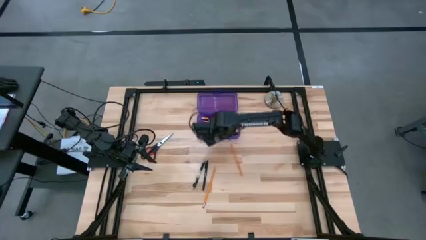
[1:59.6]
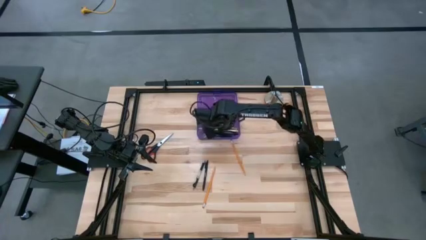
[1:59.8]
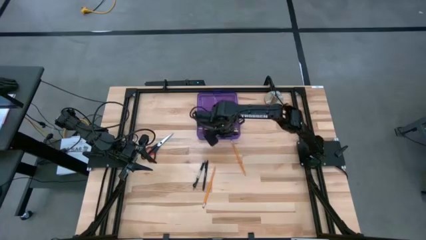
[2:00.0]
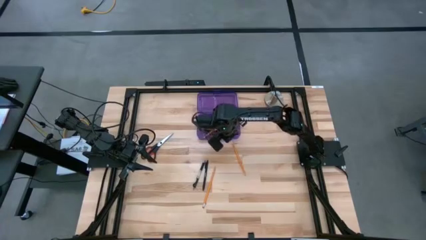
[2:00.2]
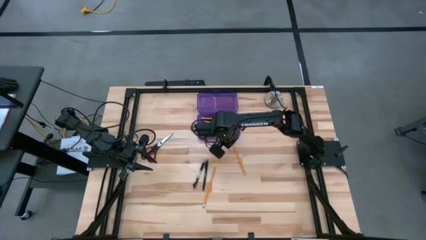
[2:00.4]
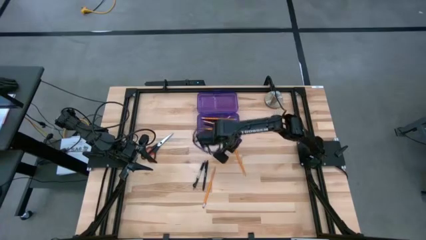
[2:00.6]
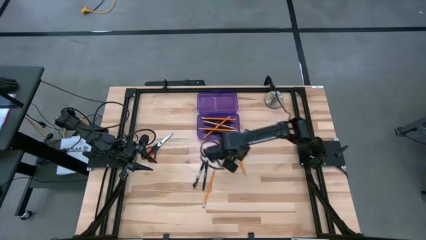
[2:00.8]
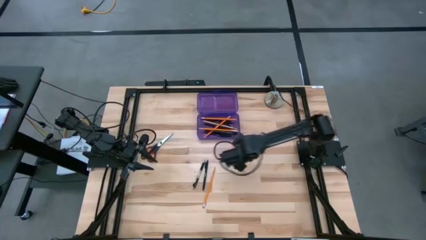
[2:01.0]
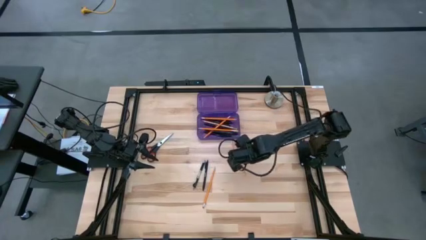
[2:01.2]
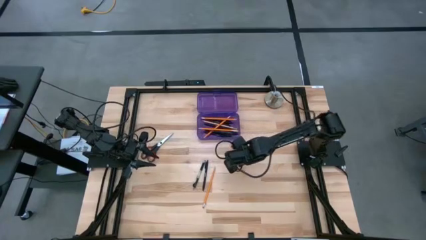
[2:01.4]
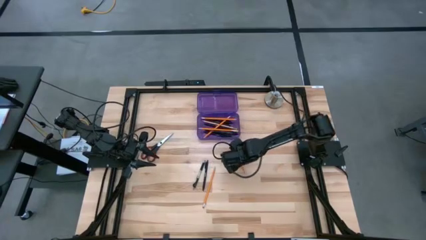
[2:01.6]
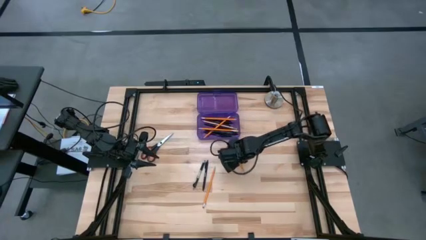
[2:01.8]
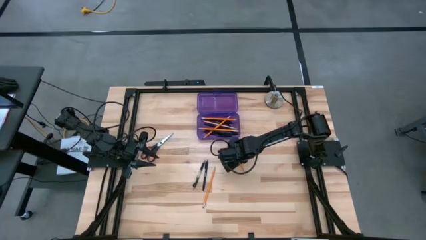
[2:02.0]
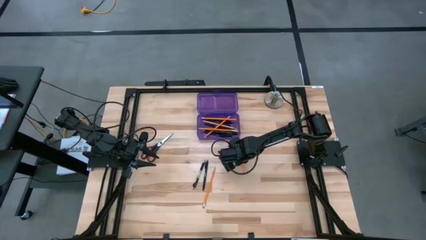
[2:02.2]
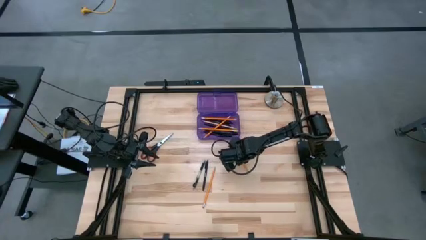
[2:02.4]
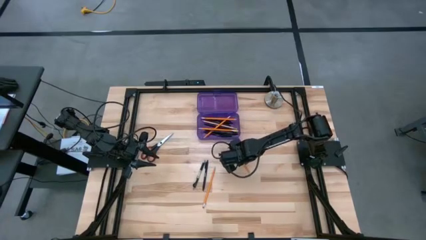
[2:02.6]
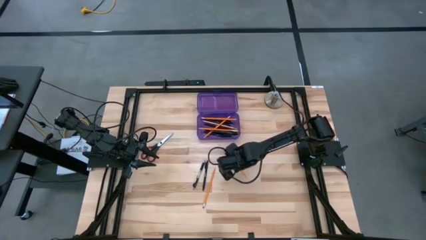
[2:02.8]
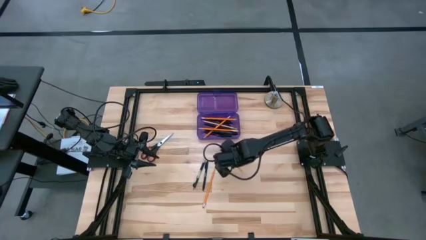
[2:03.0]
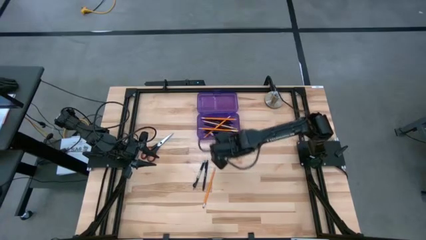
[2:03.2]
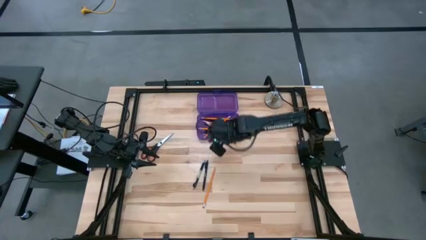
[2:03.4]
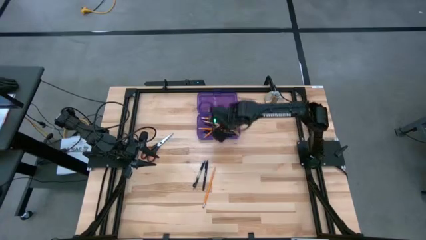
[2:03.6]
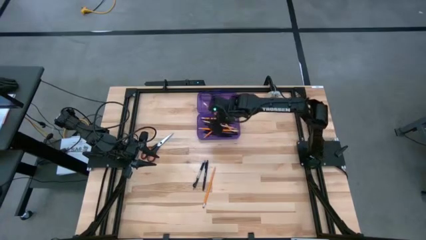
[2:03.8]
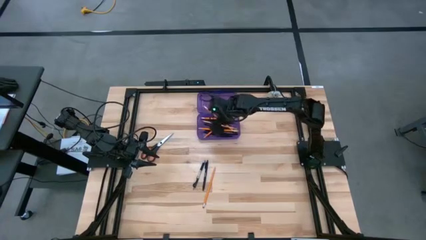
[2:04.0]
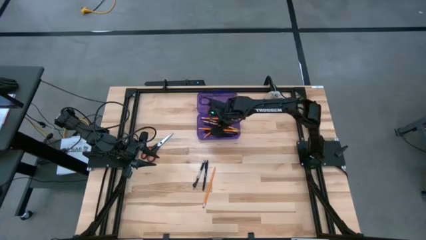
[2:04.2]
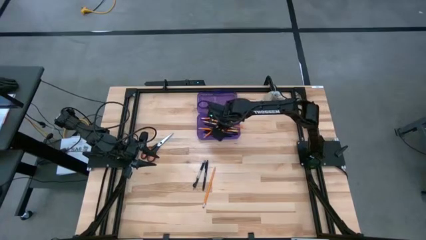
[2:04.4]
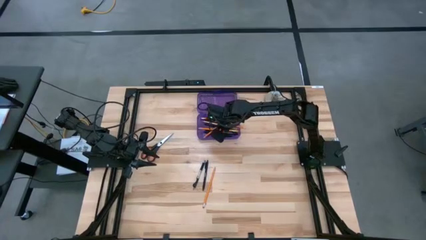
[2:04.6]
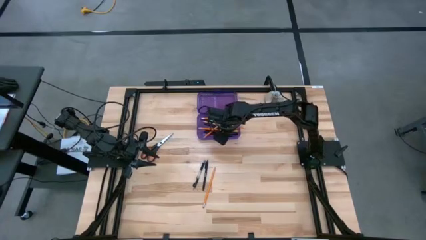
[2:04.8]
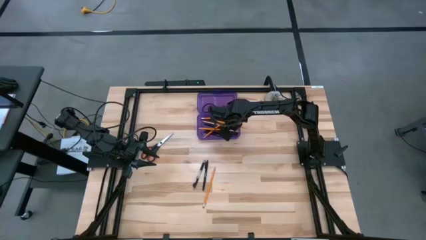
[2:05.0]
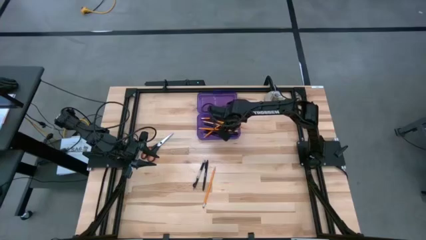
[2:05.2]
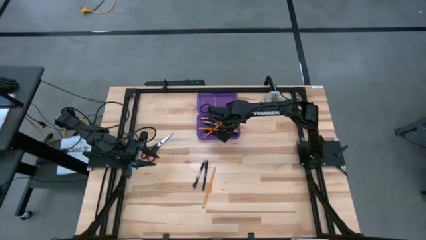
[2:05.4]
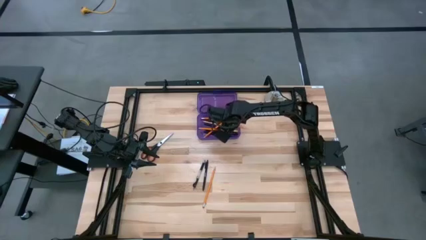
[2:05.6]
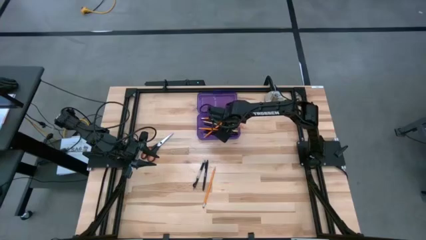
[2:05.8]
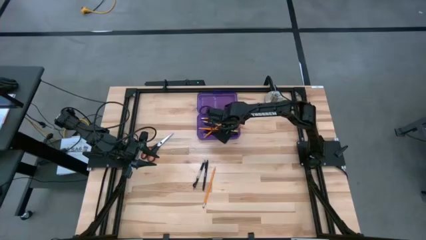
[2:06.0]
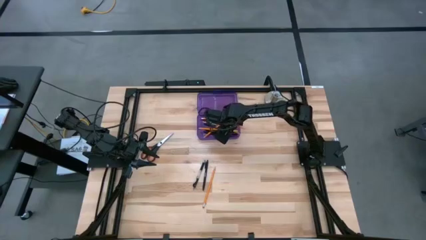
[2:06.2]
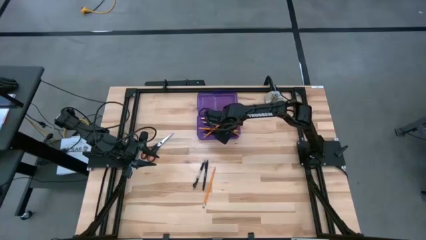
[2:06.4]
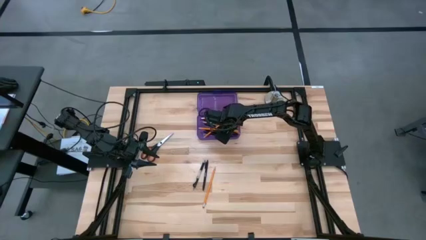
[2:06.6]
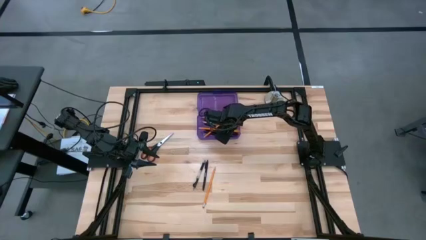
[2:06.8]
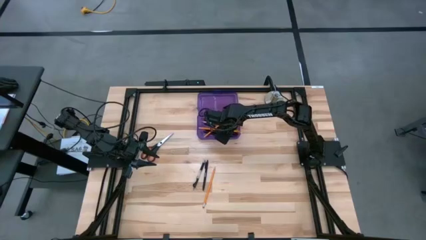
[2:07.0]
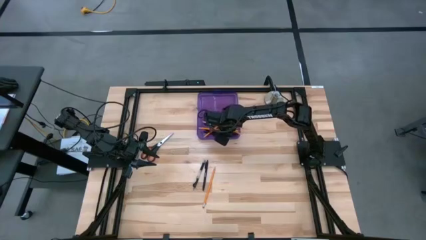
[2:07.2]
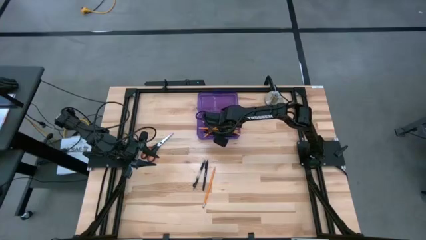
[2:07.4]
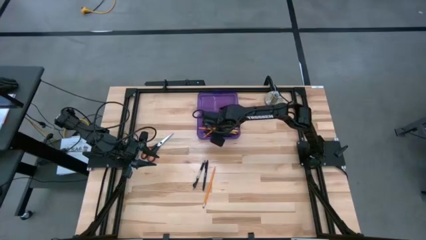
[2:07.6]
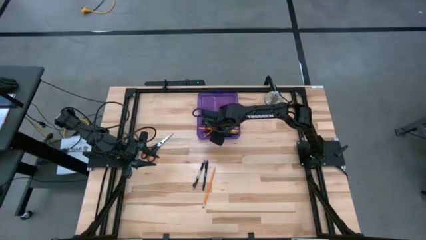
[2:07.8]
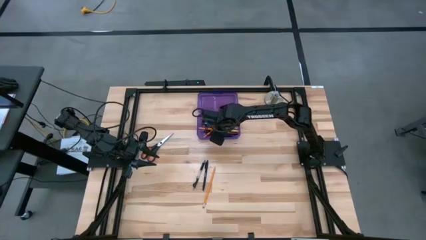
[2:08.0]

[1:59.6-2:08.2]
Task: Pick & place school supplies into a supply box
Put the orange pencil into the purple supply box

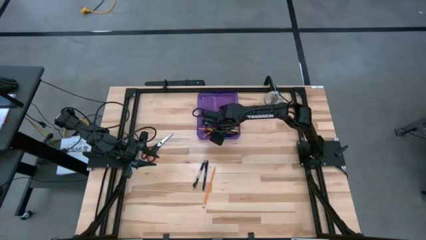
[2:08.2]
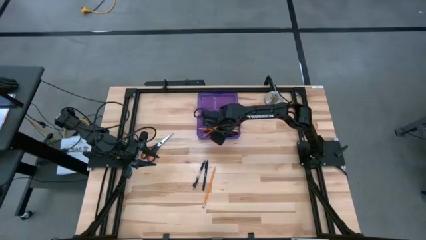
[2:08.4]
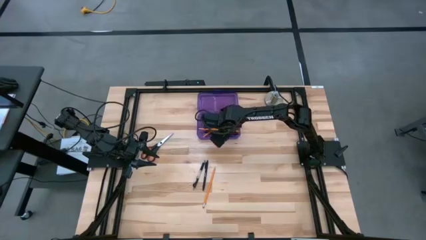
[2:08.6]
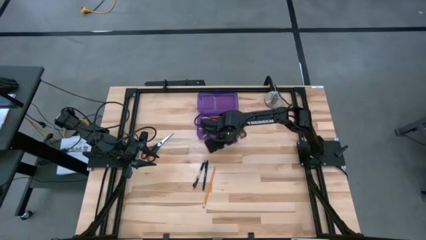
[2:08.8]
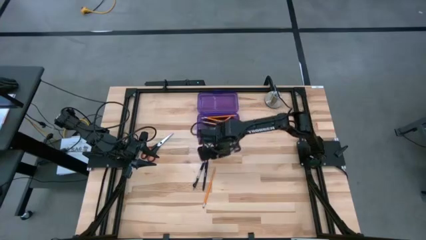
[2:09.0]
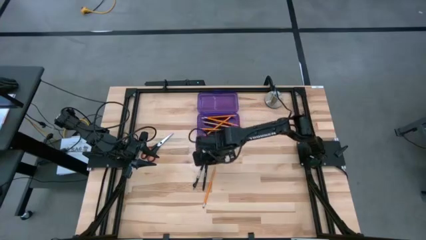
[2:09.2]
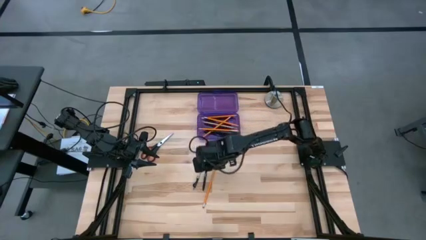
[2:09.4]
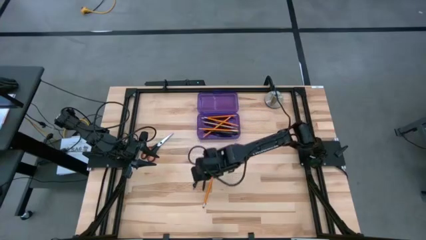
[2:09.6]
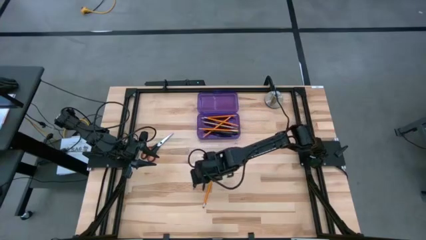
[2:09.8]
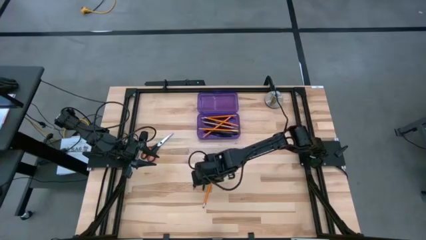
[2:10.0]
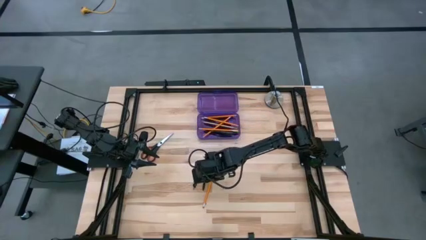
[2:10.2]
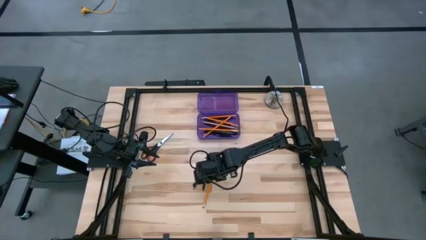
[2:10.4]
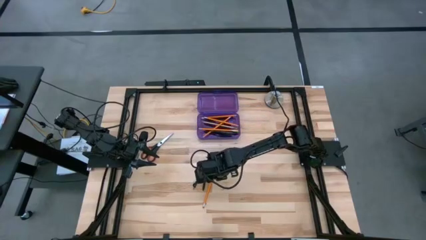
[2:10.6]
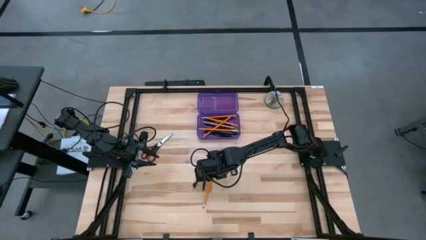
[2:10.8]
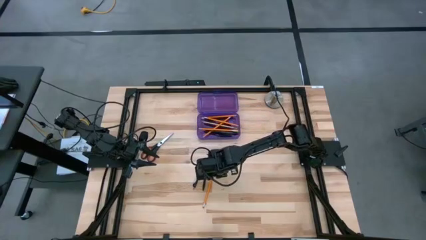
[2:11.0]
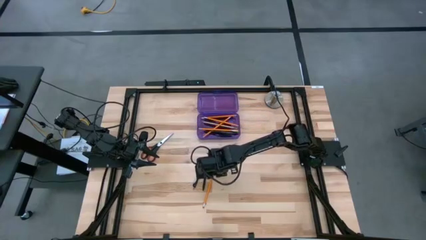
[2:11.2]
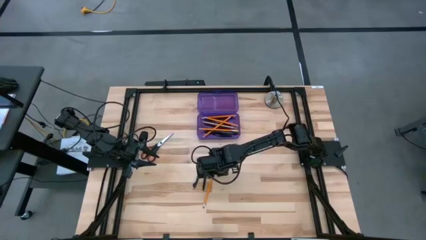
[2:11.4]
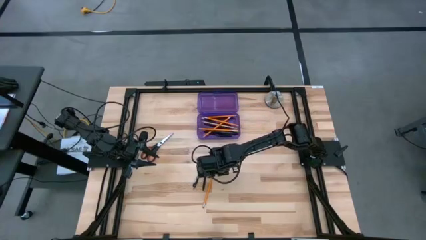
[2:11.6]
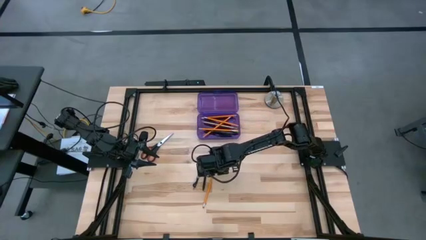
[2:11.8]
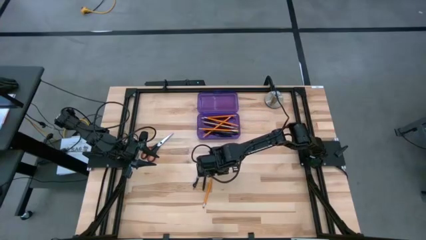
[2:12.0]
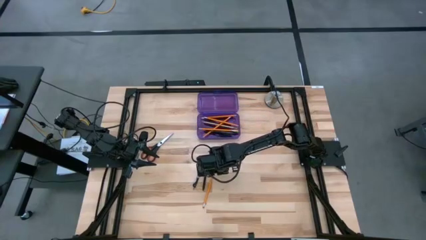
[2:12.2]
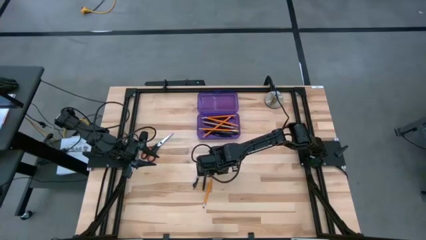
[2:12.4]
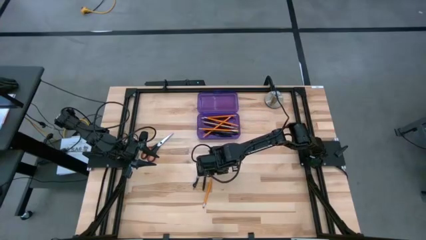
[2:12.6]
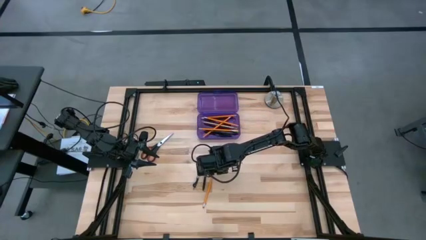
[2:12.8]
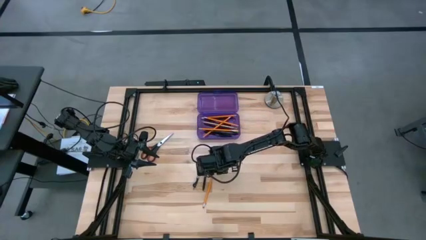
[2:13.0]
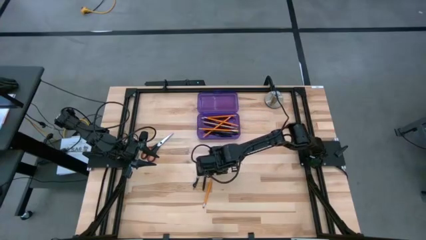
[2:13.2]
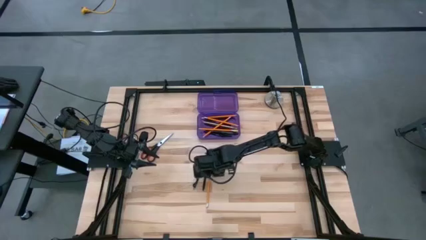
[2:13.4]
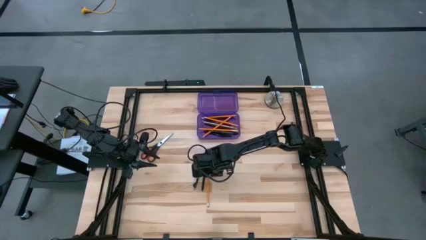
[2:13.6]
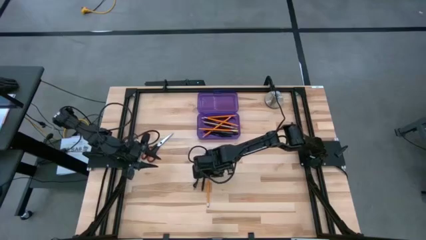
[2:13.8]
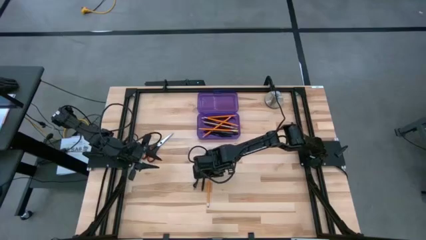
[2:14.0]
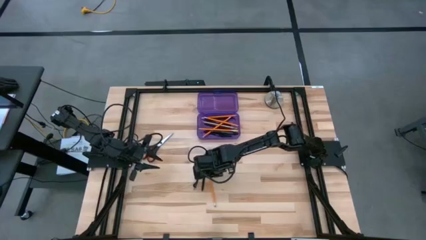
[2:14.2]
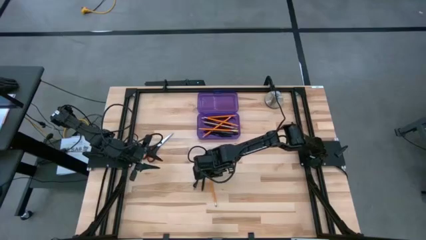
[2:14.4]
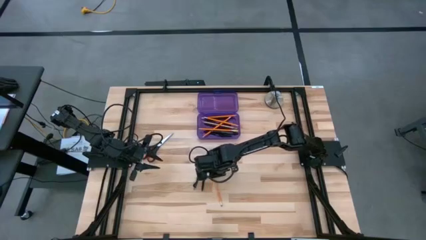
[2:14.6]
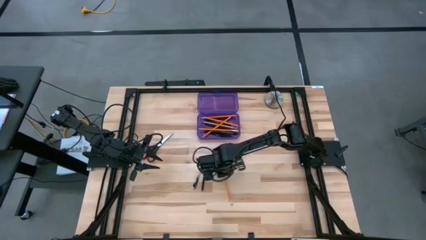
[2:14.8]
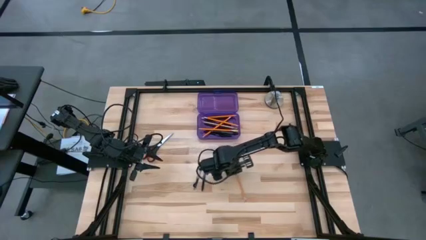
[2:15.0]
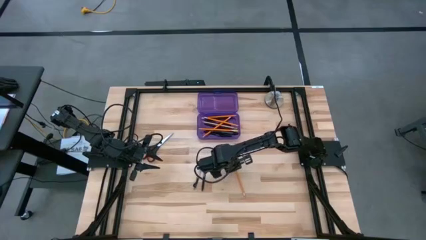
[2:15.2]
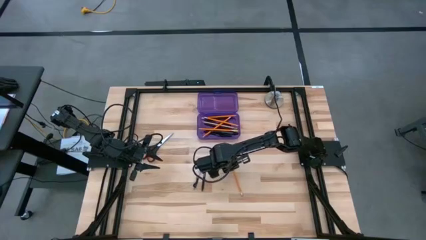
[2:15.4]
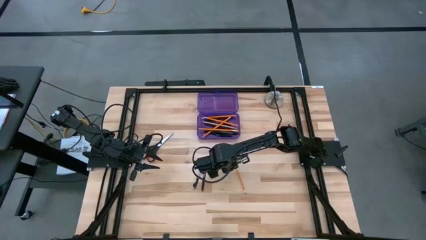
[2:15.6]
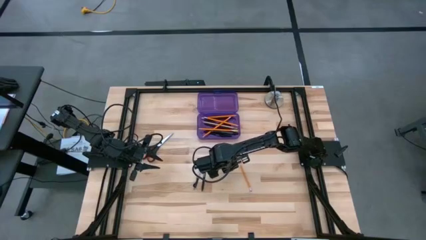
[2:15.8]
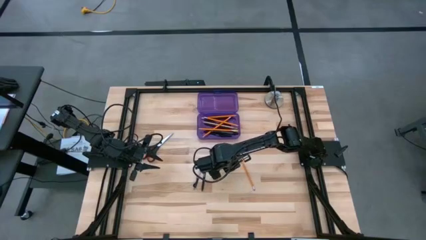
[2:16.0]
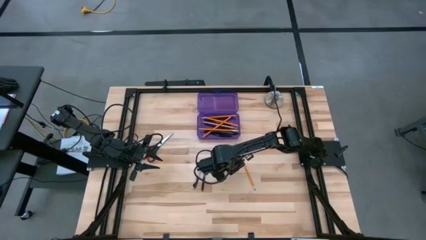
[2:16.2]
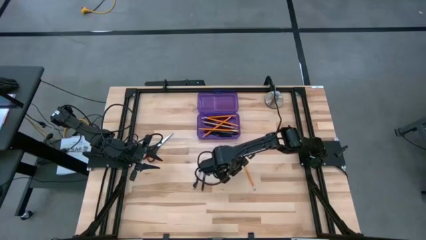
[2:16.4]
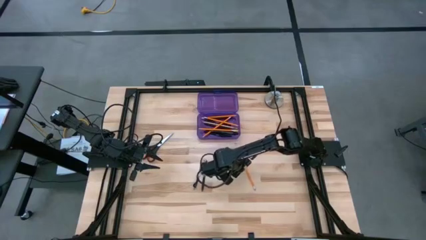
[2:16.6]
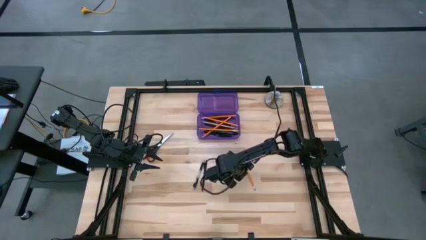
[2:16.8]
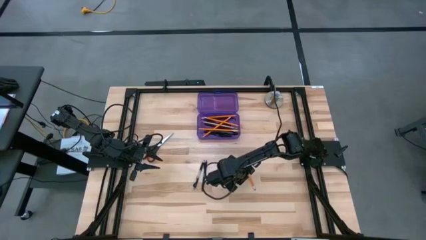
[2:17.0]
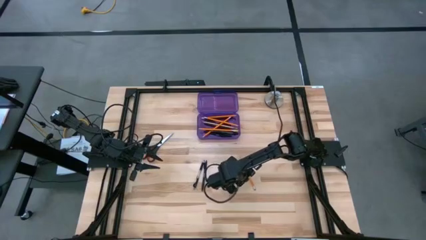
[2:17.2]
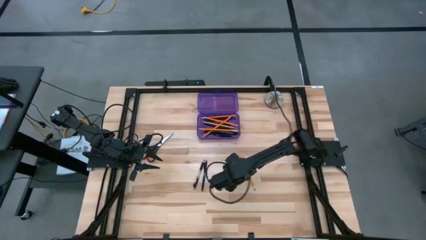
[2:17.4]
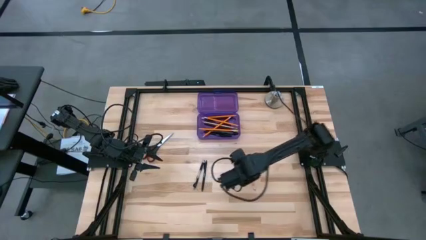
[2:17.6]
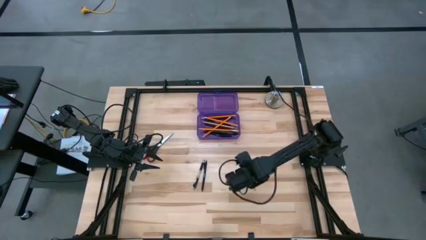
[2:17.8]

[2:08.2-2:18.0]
Put the orange pencil into the purple pencil case
